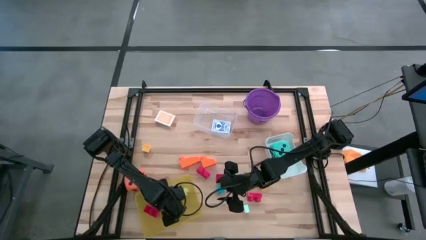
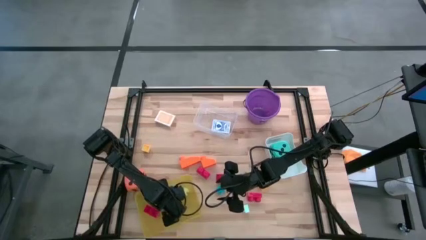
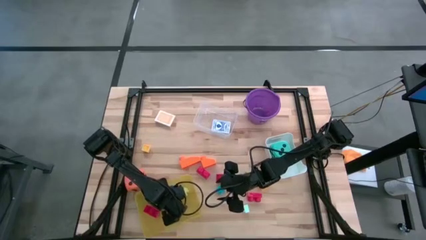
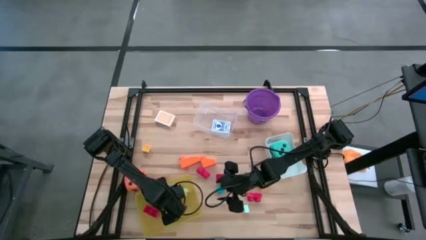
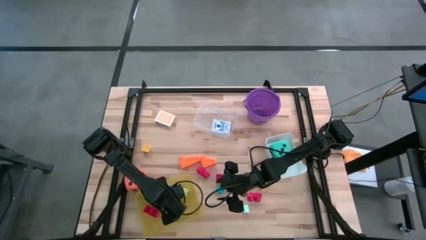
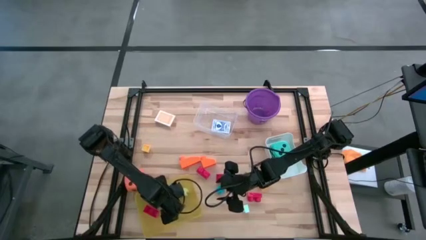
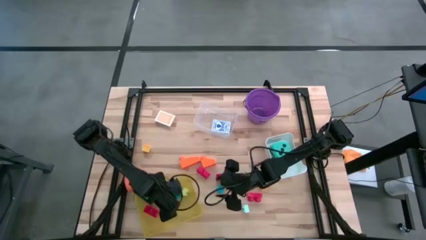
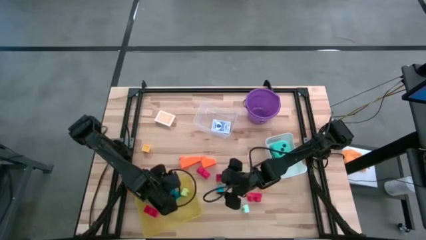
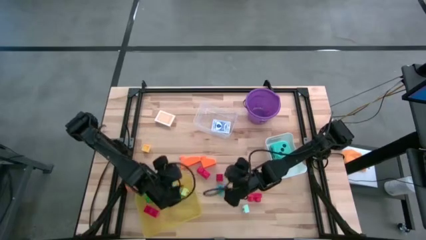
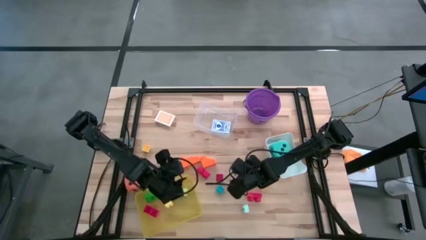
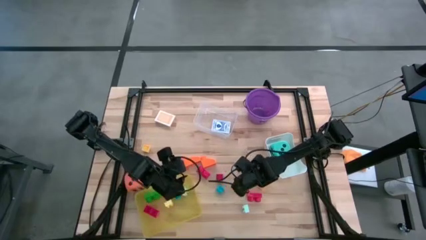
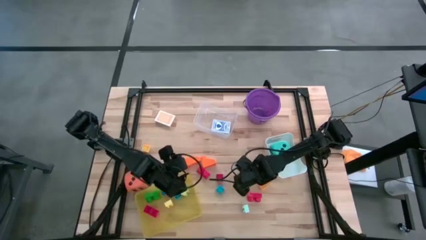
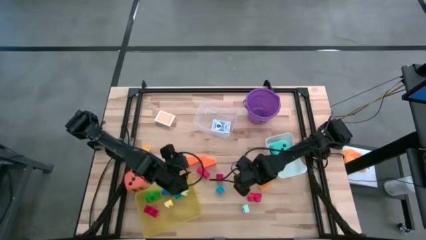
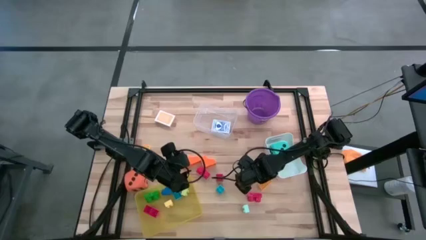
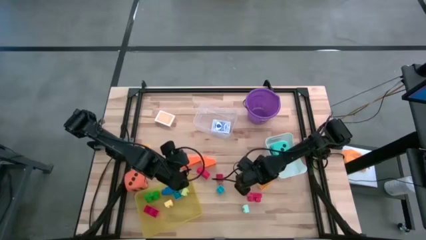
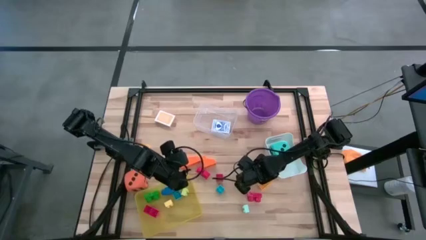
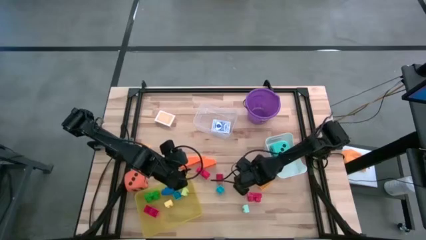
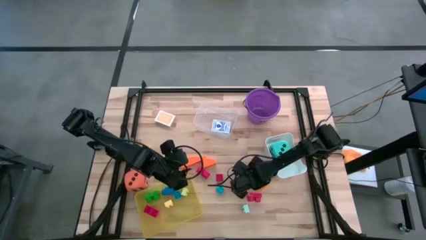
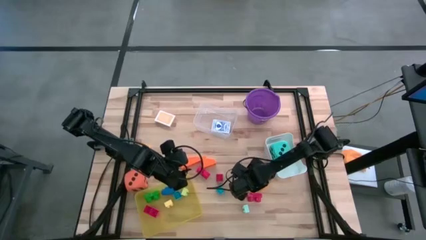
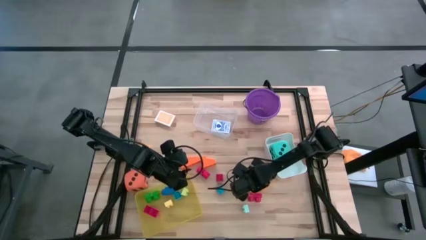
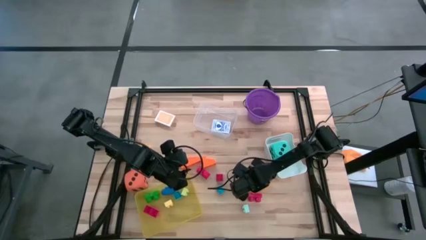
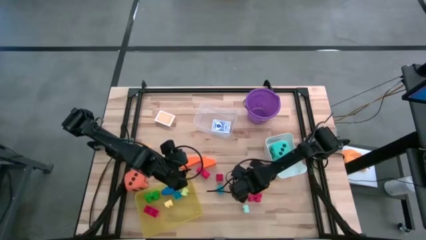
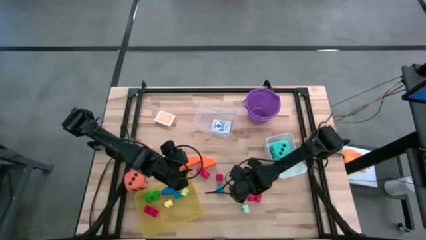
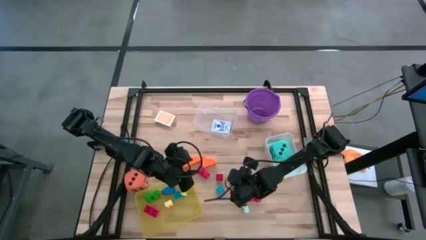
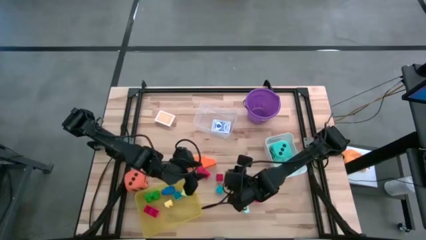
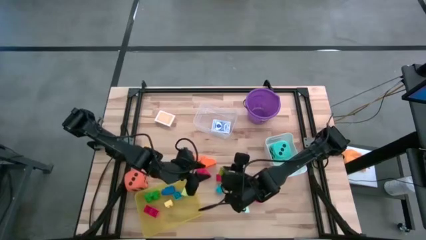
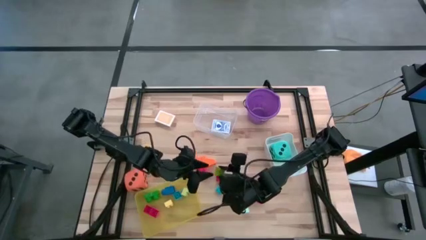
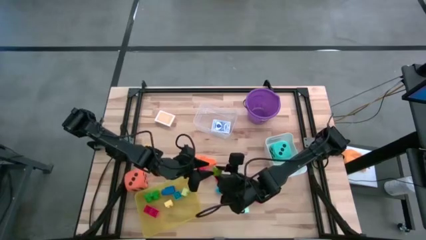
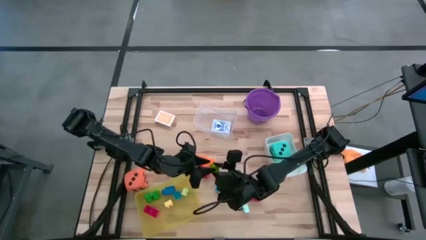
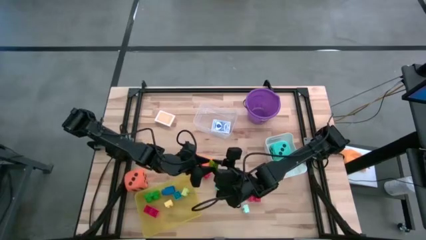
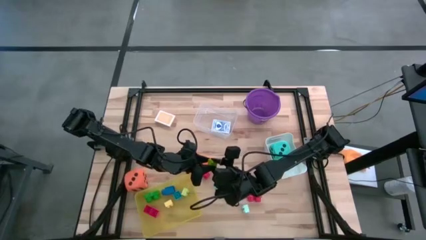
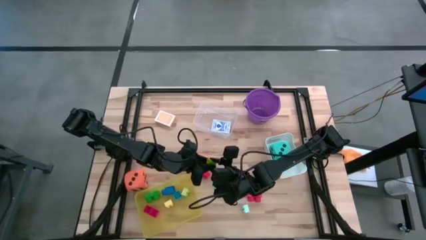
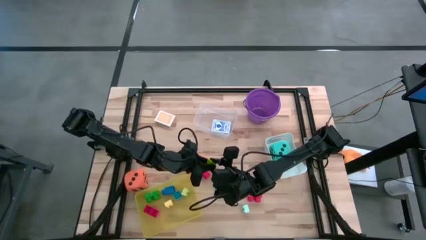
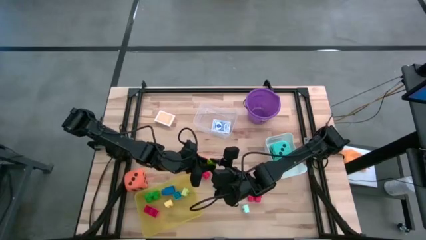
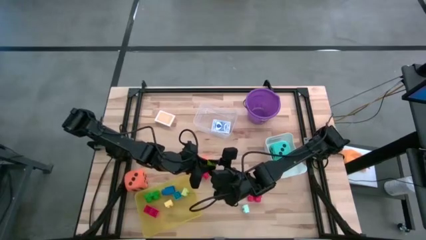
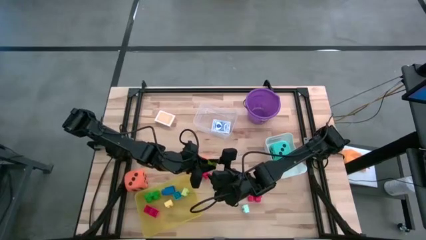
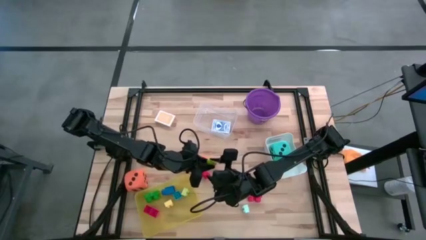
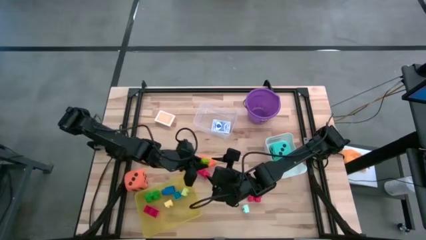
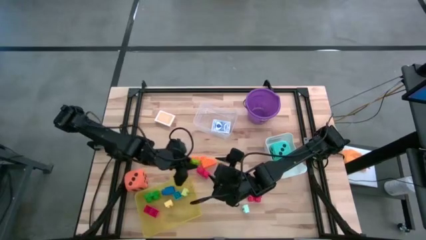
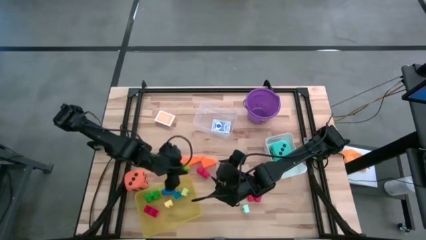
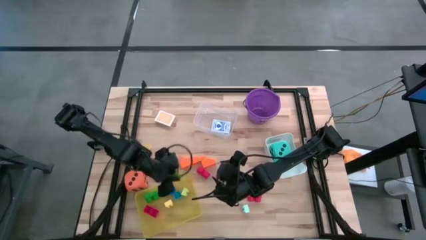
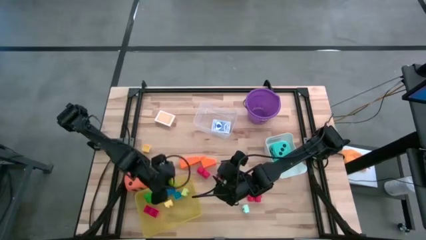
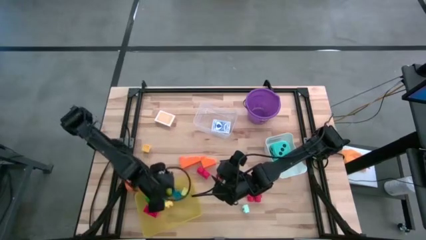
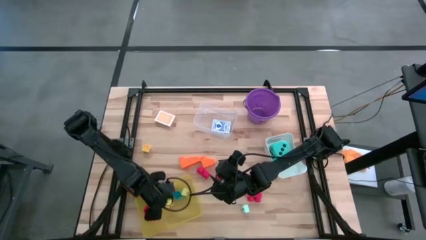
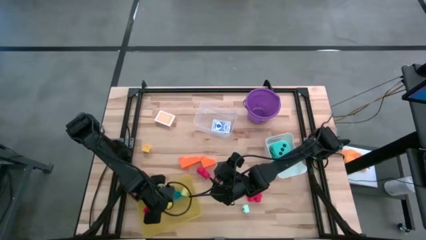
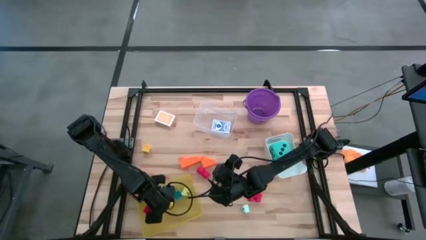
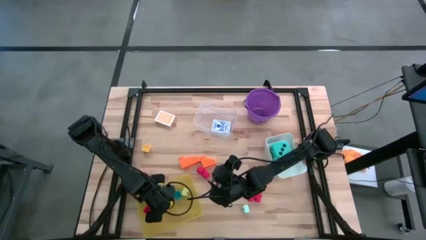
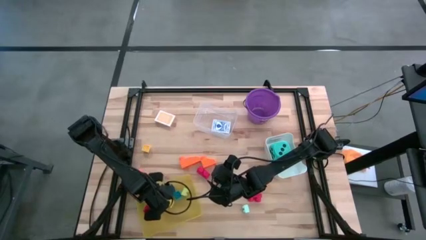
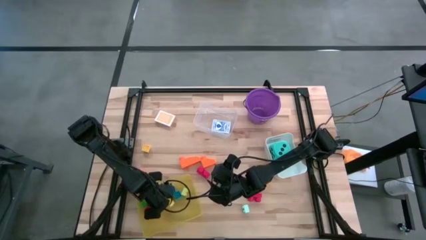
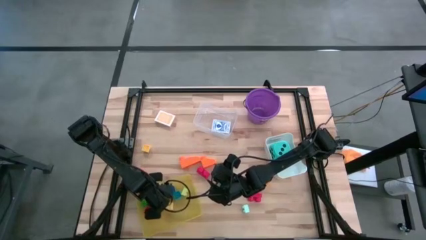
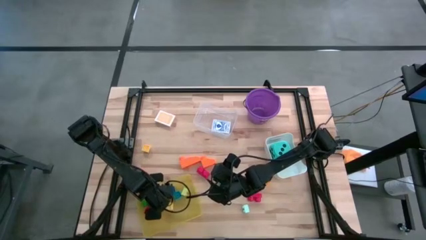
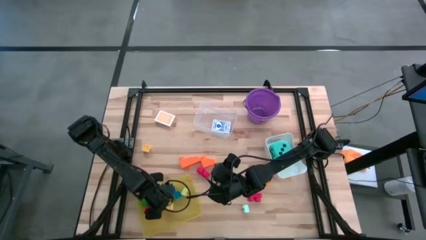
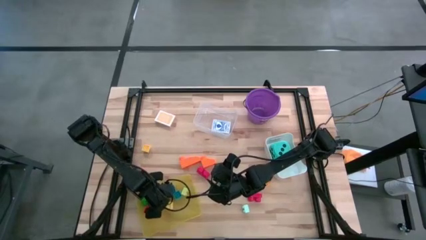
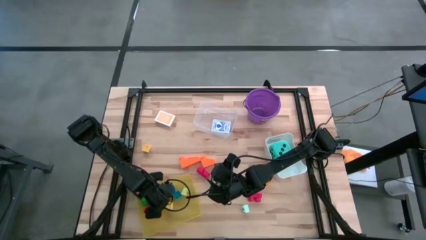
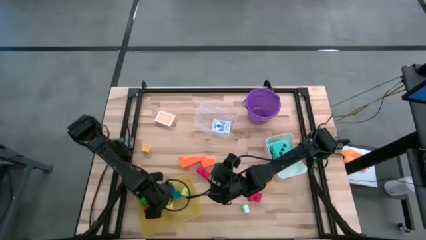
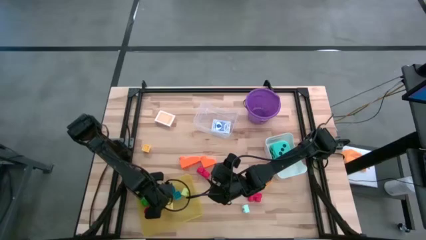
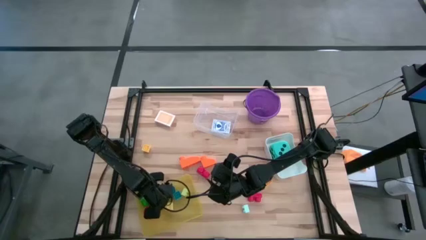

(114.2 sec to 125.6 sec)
Task: Pick & Place Toys
Put the green game piece into the yellow bin
